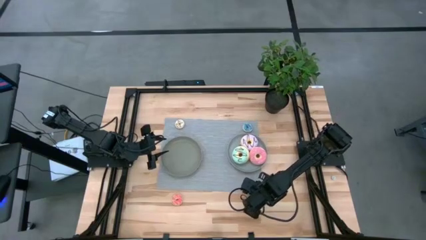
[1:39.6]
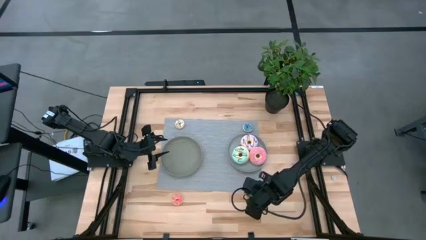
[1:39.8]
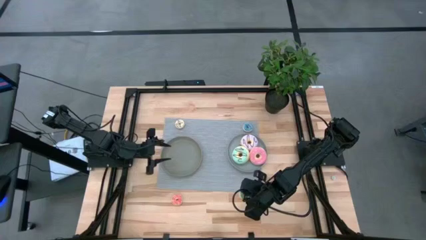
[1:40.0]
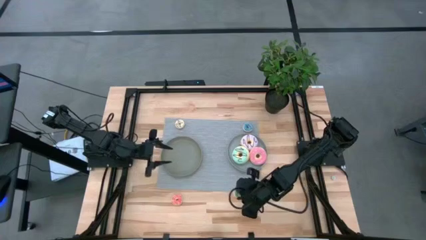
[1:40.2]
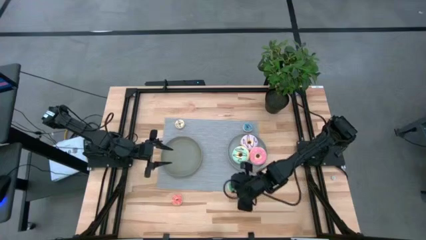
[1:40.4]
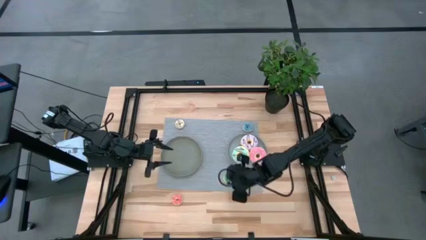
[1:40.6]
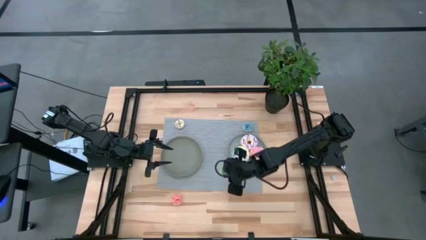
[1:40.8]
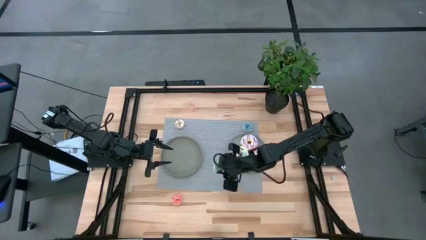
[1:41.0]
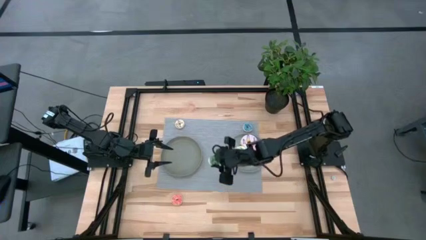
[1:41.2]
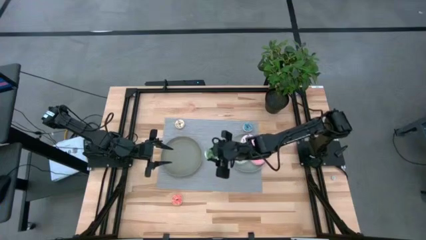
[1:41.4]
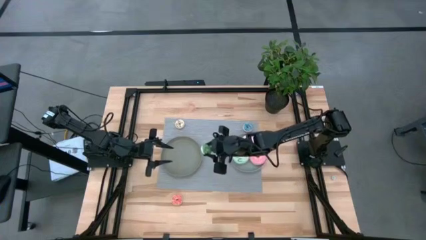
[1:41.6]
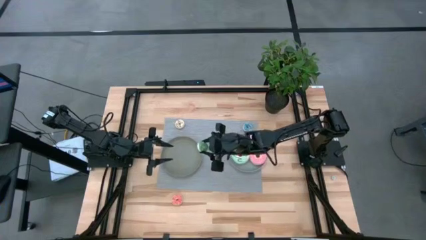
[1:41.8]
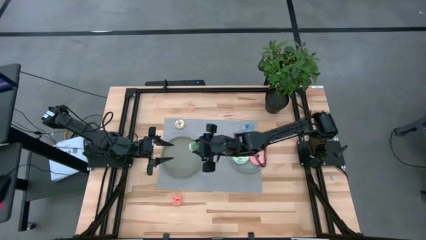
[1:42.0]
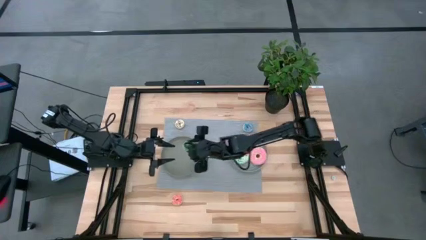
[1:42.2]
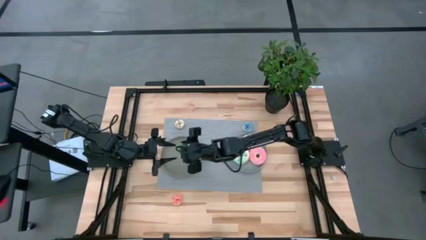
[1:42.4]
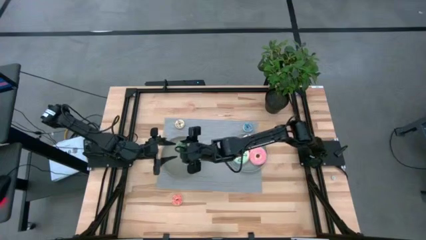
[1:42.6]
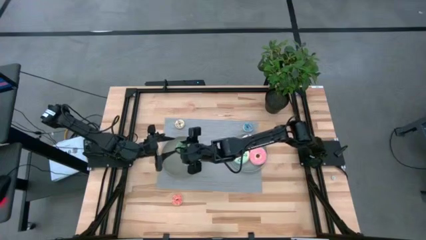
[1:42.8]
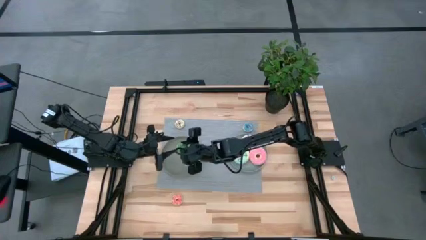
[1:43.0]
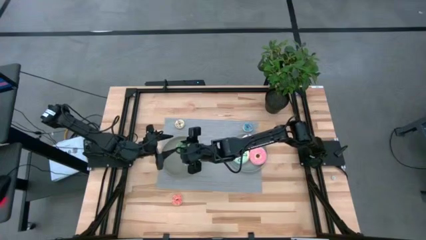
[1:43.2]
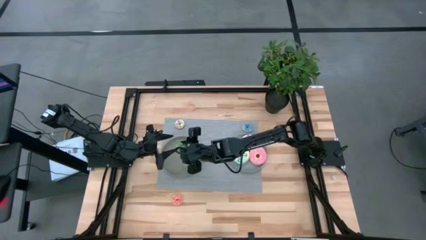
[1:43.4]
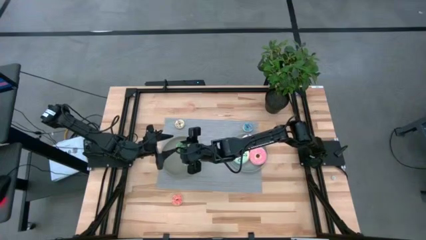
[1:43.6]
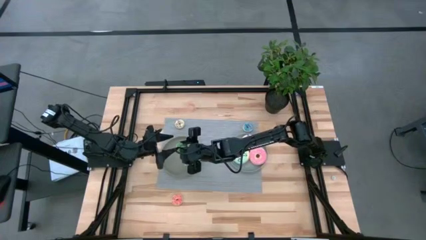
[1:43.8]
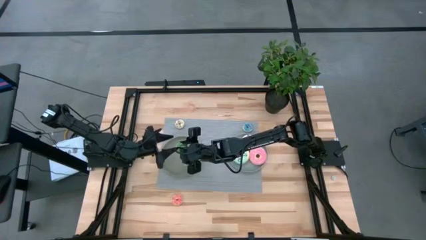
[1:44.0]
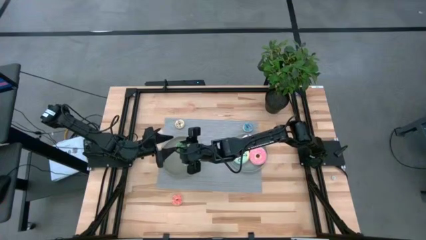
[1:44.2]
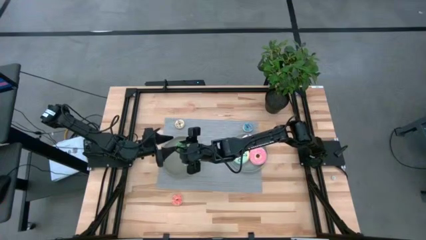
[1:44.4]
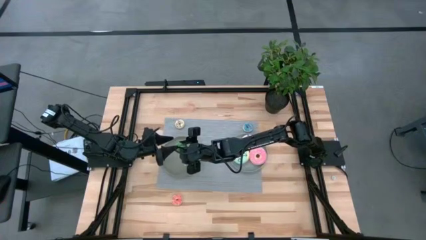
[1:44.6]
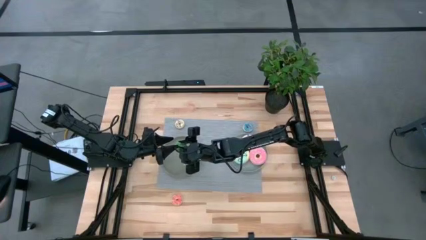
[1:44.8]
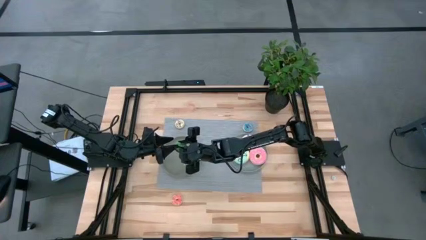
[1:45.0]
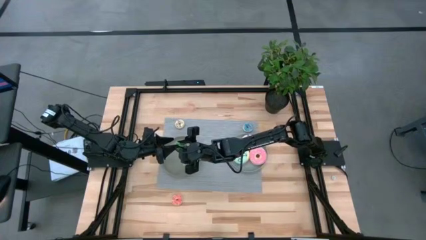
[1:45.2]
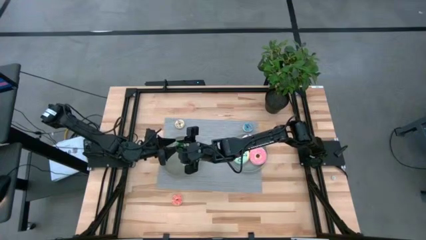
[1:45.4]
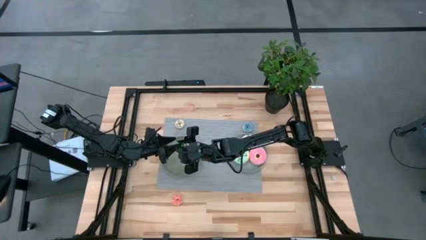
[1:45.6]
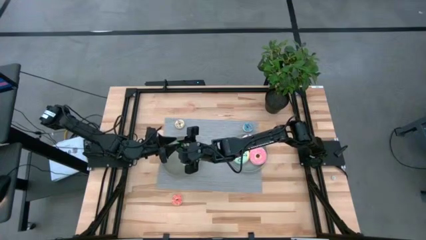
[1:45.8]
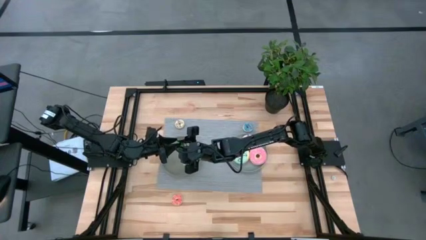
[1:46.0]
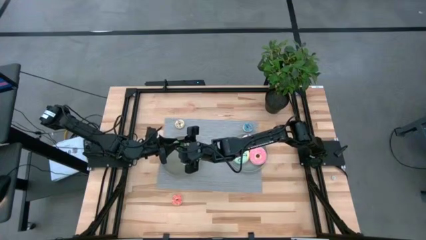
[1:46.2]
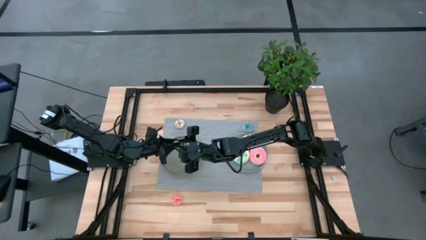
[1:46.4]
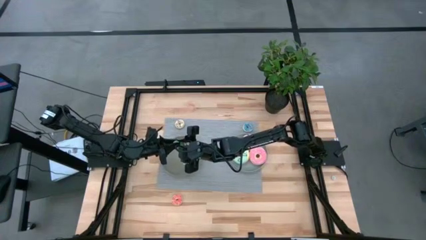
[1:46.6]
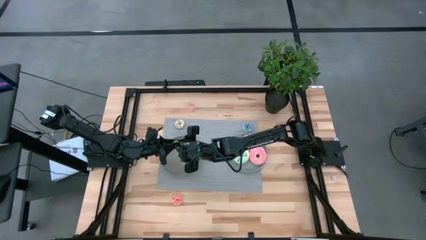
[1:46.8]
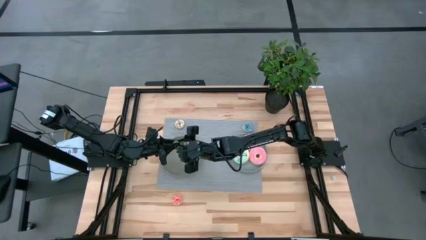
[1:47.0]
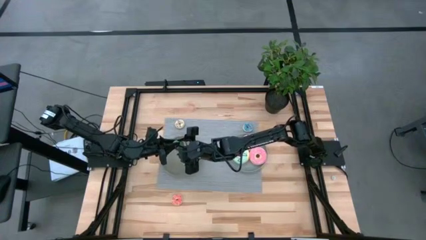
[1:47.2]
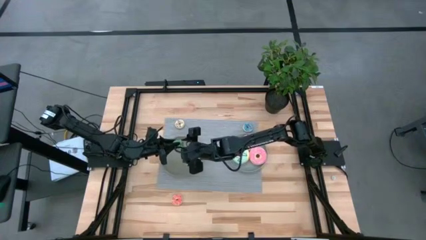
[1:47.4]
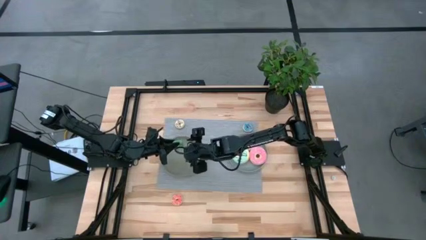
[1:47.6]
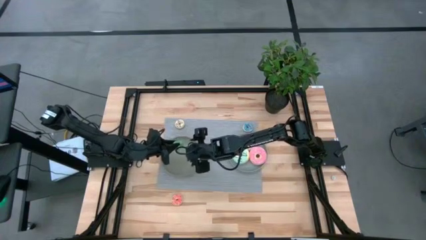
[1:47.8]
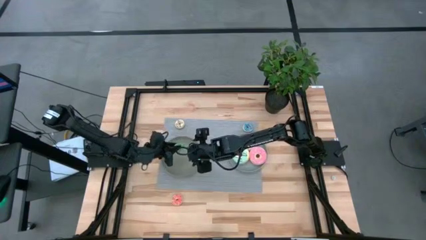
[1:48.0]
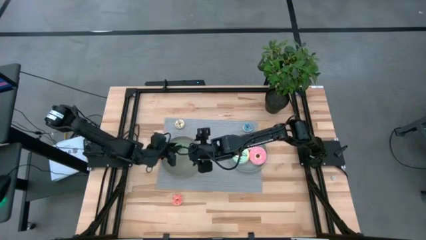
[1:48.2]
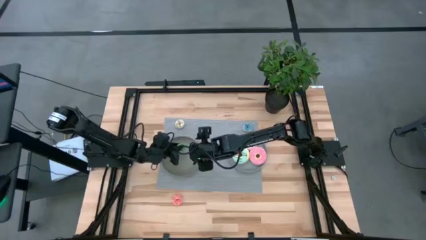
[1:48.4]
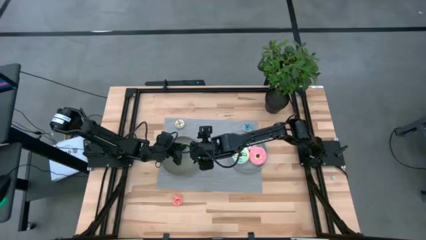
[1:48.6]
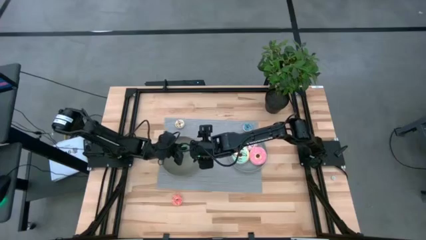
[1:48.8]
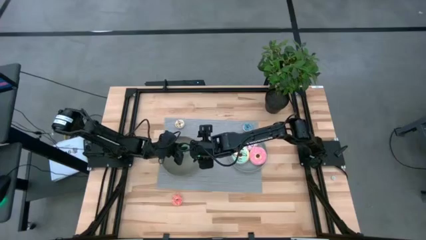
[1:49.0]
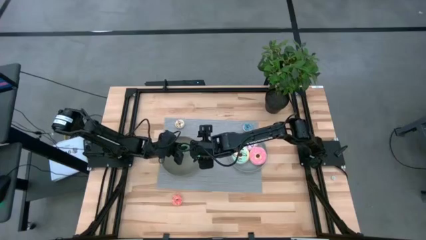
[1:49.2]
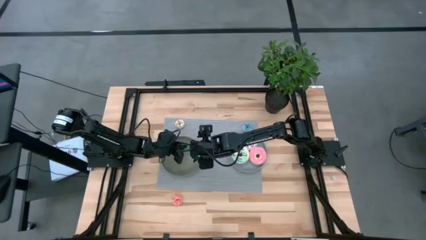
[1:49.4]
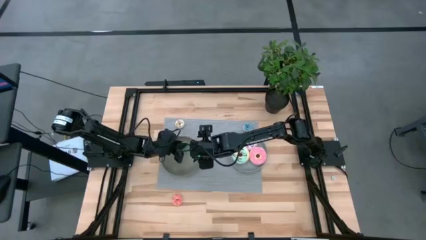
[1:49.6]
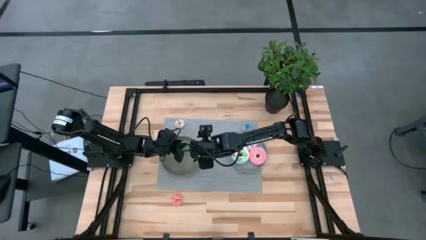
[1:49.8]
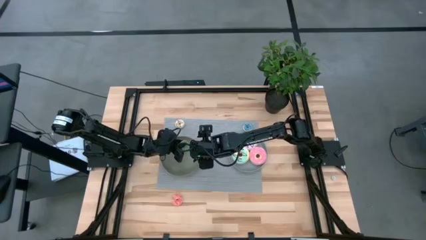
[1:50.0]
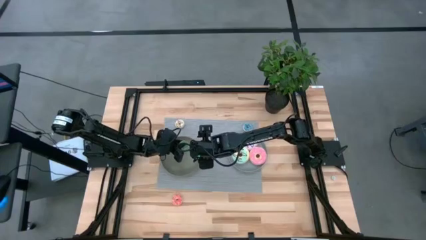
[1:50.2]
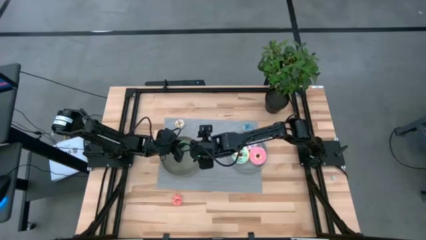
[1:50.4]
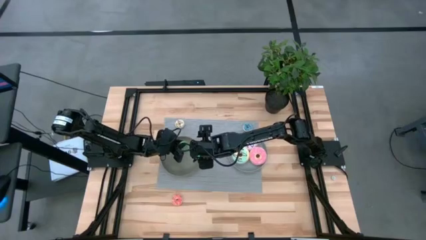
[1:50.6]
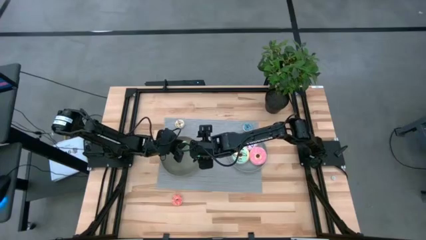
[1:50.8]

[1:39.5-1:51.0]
Task: Pick & Place donuts
Put the small green donut into the green plate

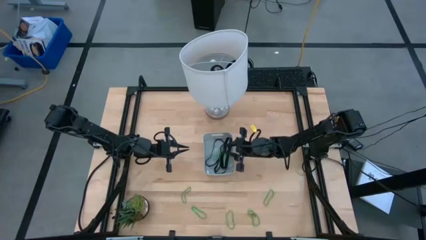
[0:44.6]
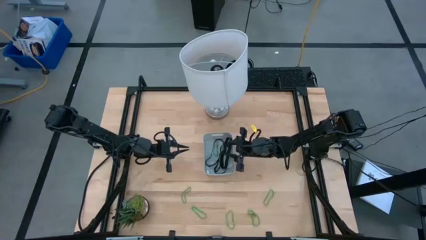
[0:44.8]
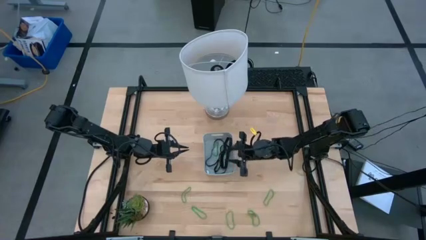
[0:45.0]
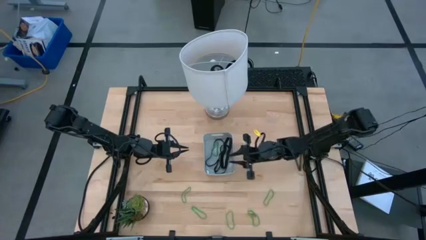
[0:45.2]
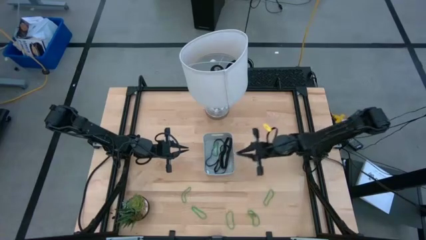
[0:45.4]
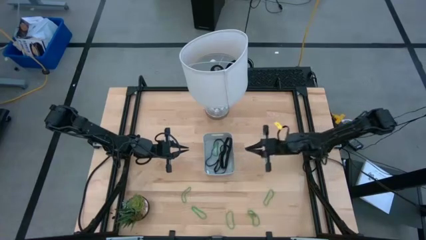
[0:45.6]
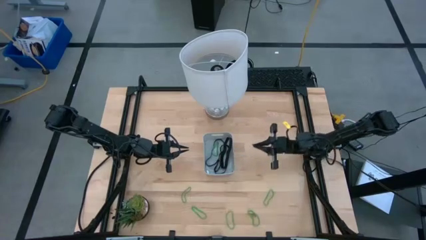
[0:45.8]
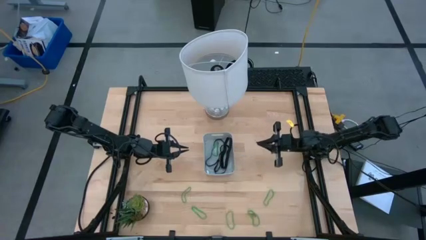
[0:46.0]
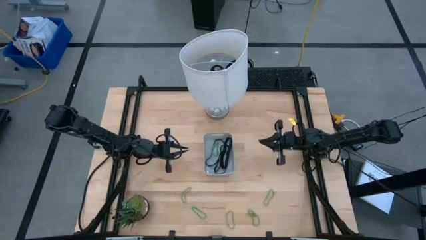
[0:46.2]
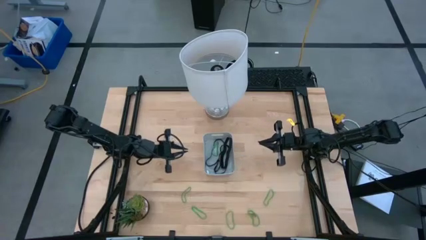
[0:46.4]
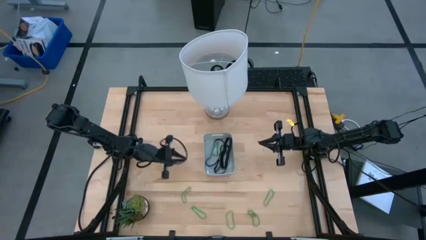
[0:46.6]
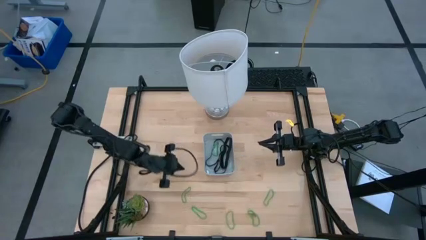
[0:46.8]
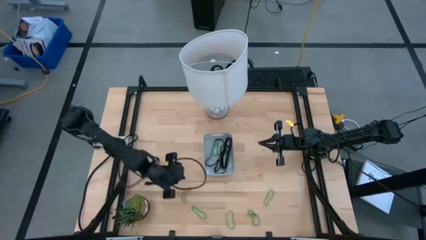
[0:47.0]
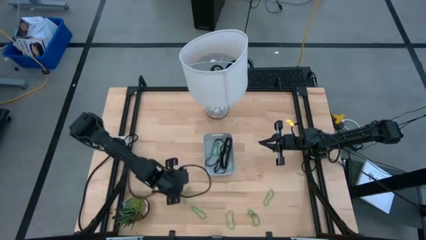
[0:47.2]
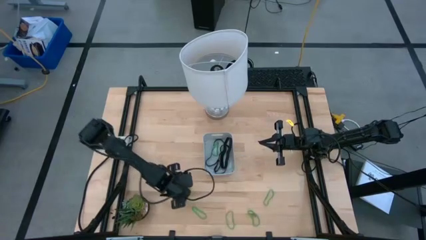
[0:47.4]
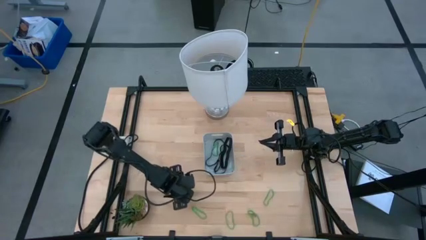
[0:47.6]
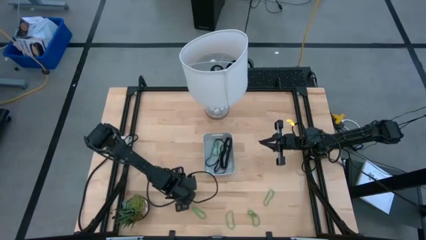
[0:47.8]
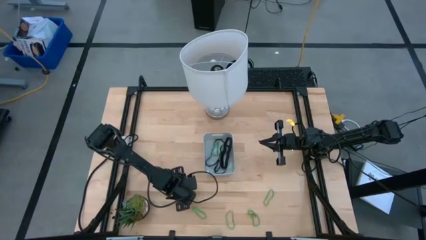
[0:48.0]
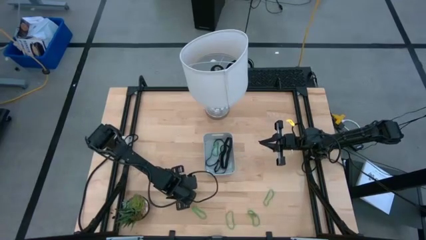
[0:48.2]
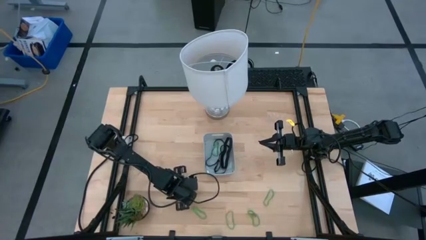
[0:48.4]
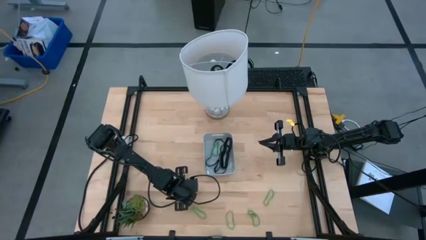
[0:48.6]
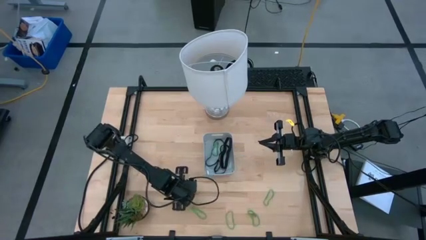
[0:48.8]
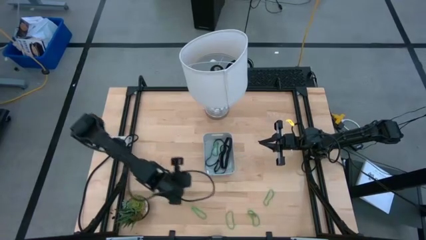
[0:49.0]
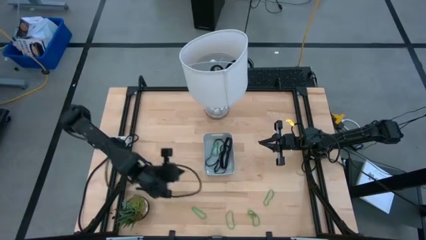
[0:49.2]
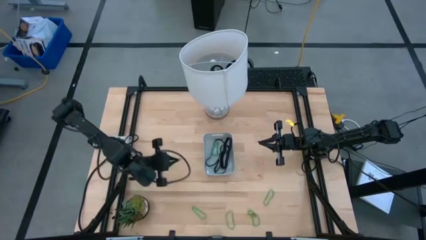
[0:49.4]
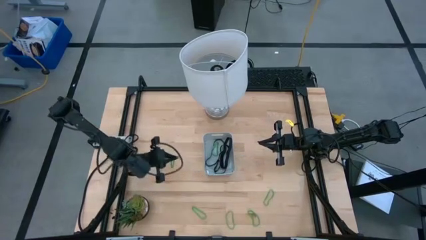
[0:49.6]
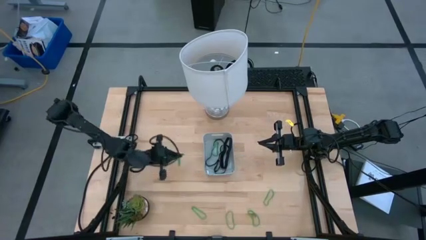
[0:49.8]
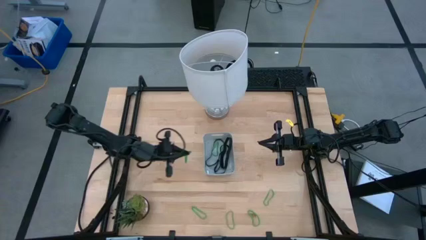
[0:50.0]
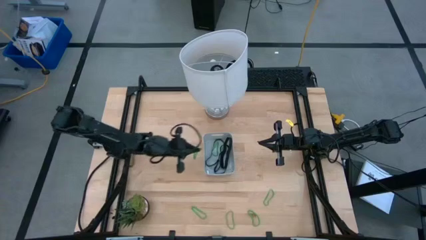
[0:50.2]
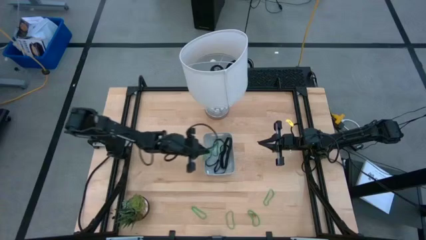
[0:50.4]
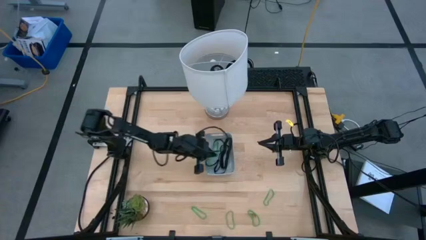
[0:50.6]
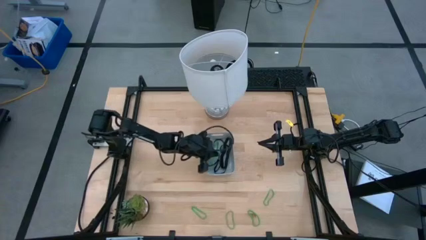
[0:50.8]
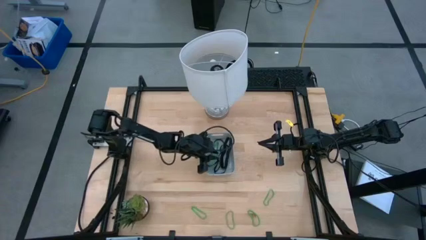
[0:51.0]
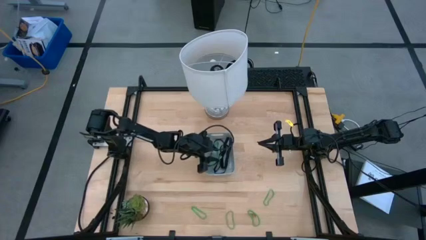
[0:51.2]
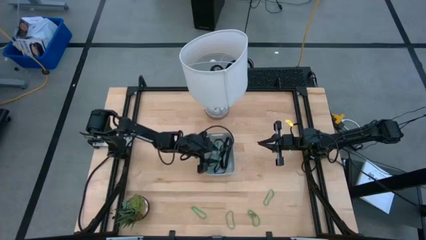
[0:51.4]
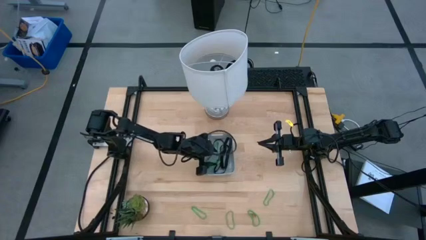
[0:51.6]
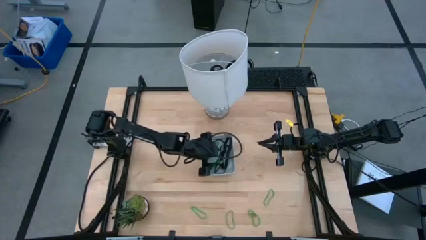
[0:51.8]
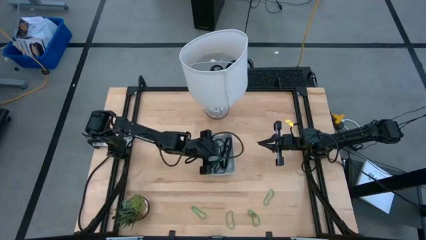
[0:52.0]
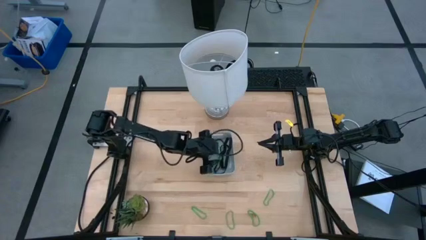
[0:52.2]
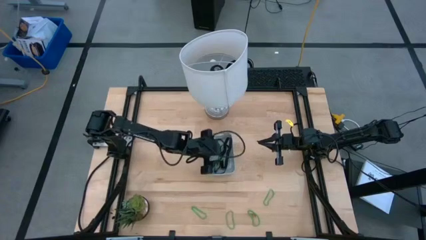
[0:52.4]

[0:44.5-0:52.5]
Task: Pick and place rubber bands into bin
Put the green rubber band into the gray bin
